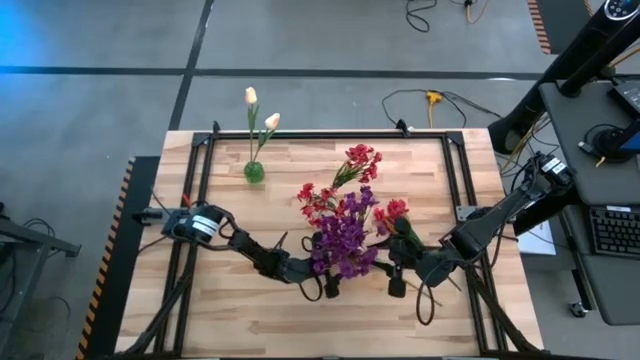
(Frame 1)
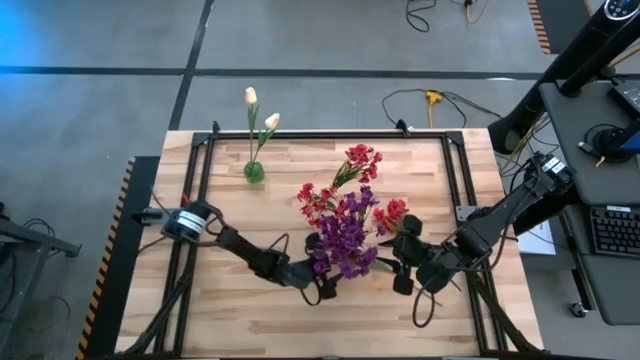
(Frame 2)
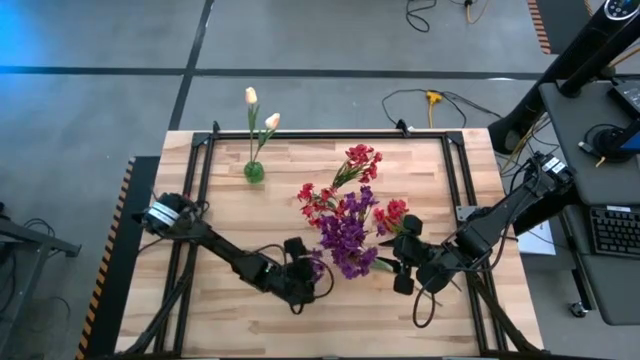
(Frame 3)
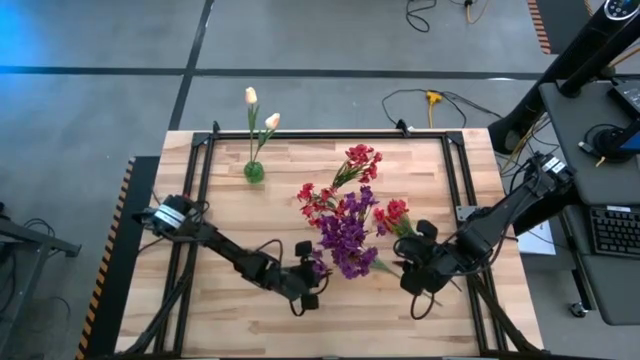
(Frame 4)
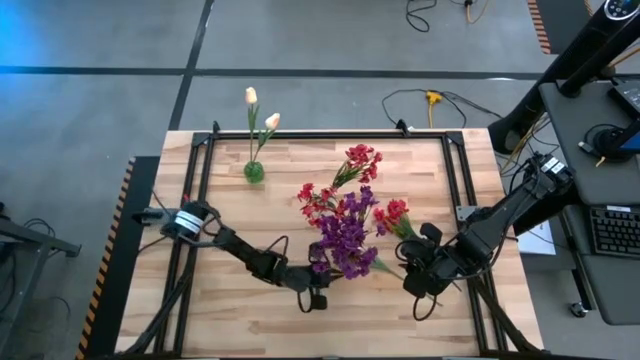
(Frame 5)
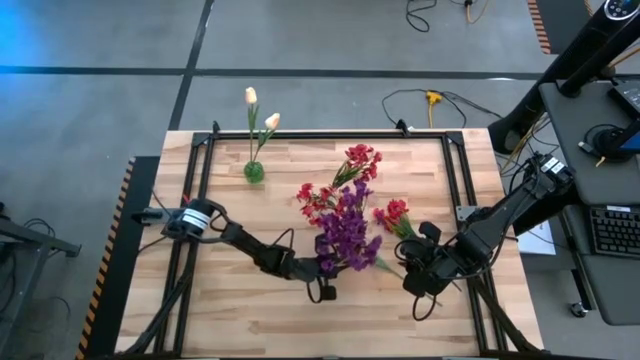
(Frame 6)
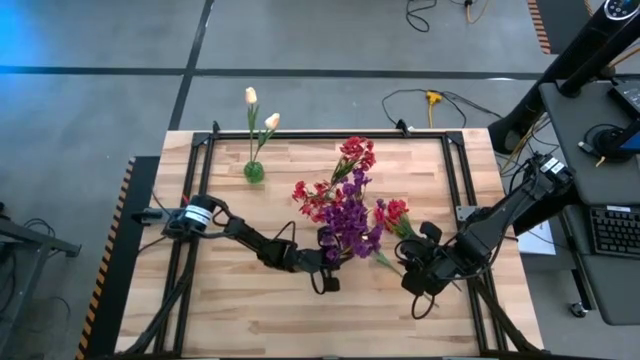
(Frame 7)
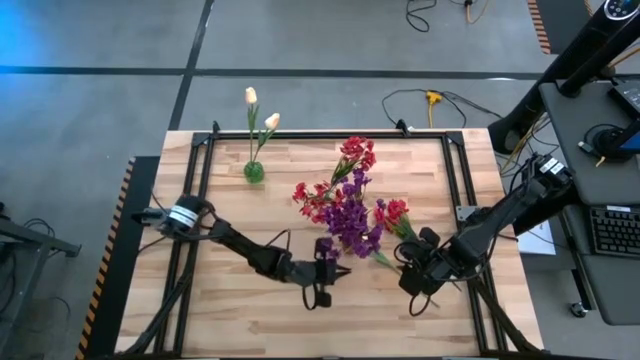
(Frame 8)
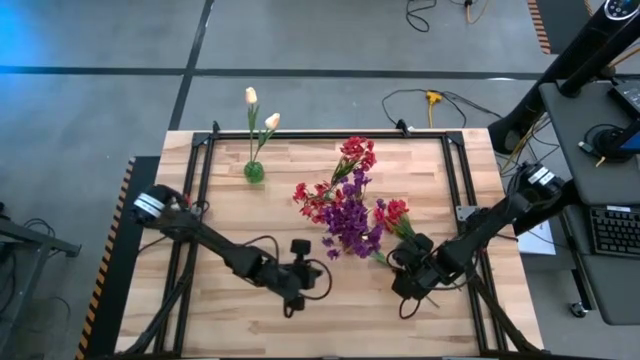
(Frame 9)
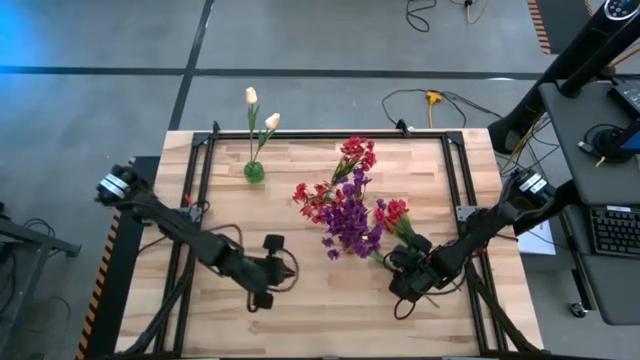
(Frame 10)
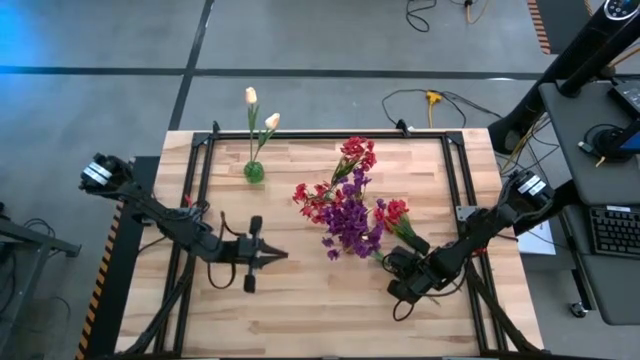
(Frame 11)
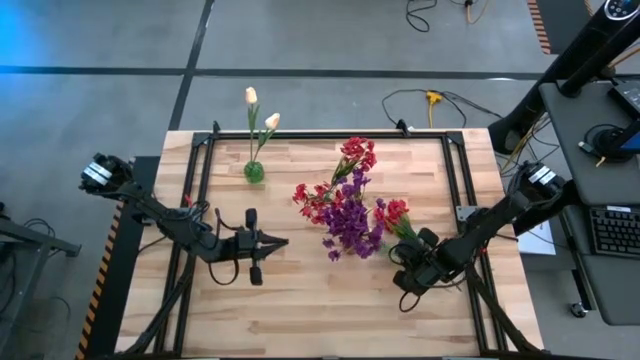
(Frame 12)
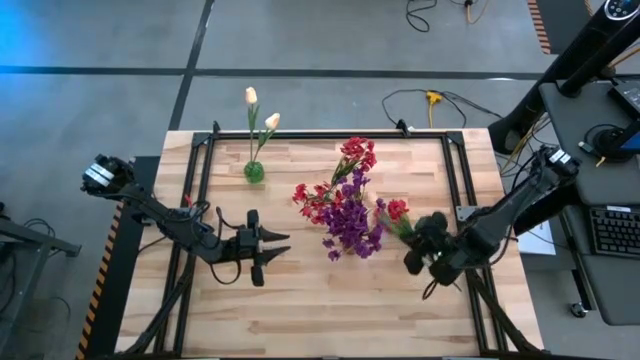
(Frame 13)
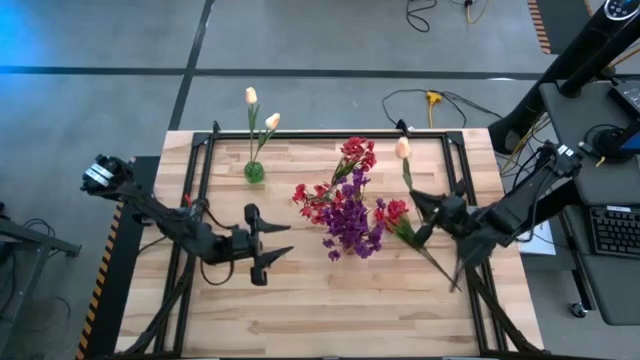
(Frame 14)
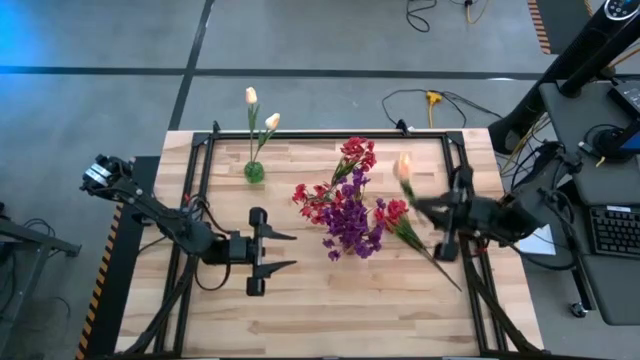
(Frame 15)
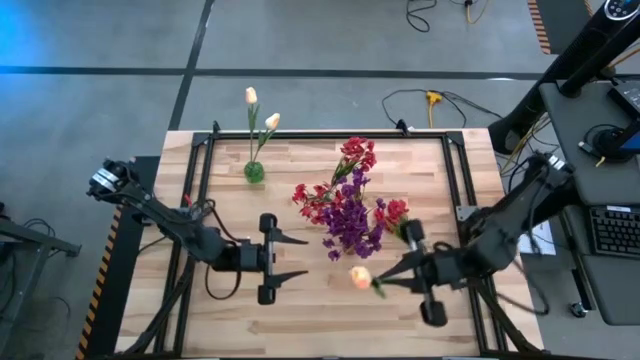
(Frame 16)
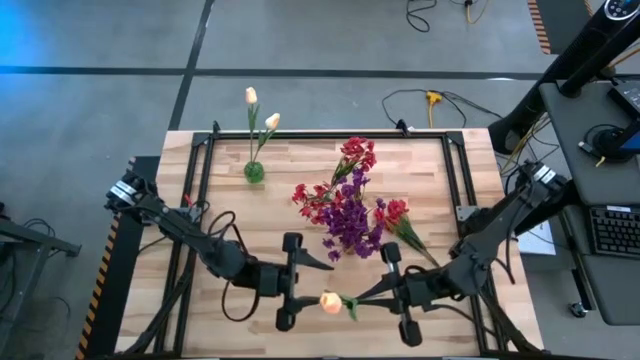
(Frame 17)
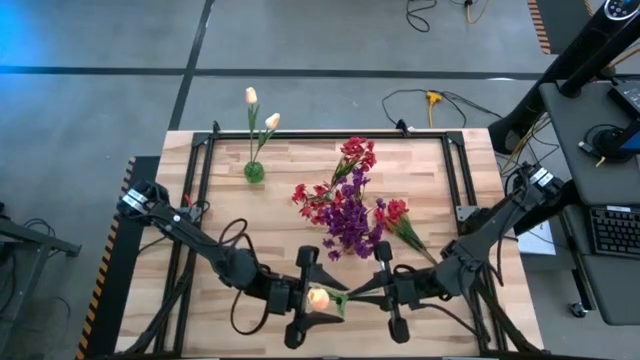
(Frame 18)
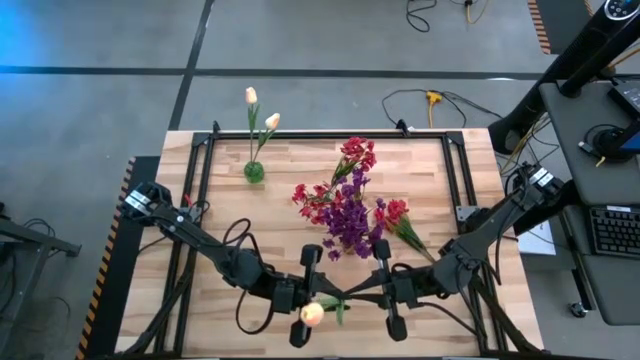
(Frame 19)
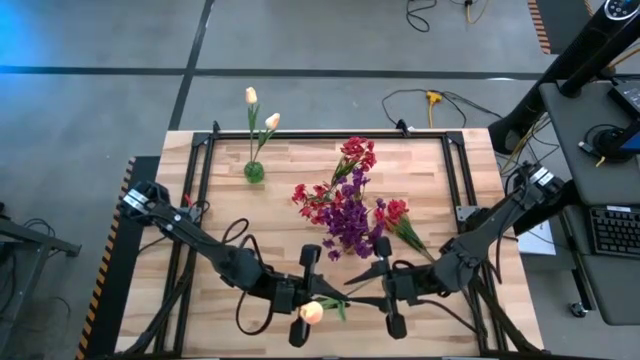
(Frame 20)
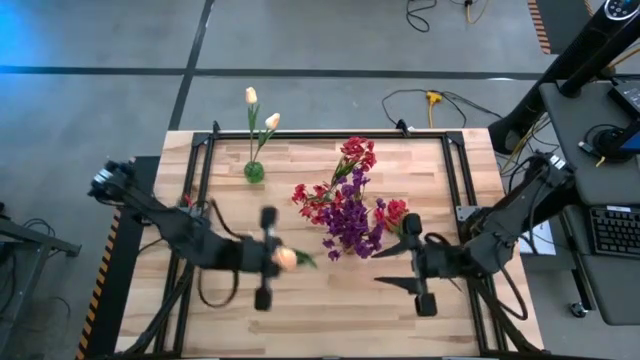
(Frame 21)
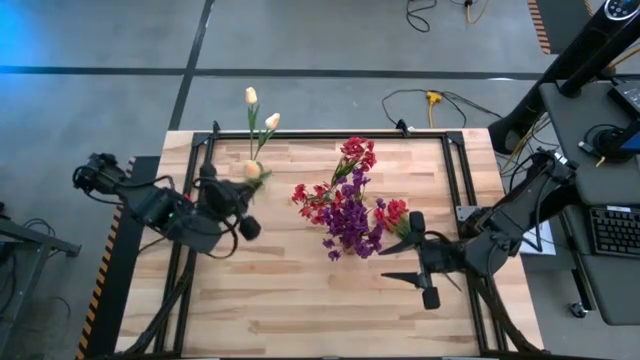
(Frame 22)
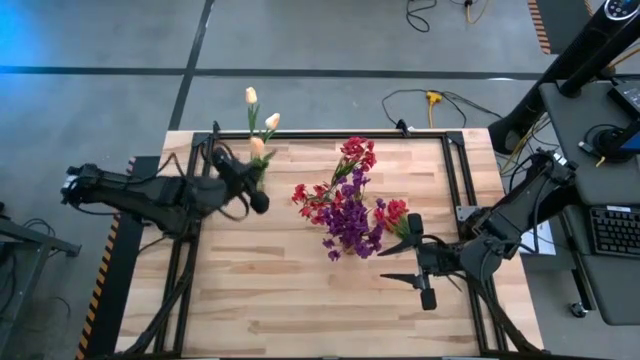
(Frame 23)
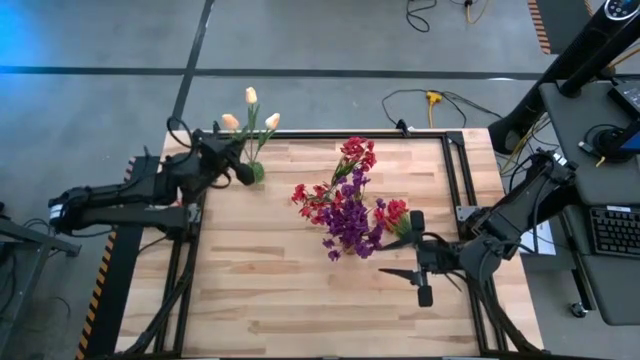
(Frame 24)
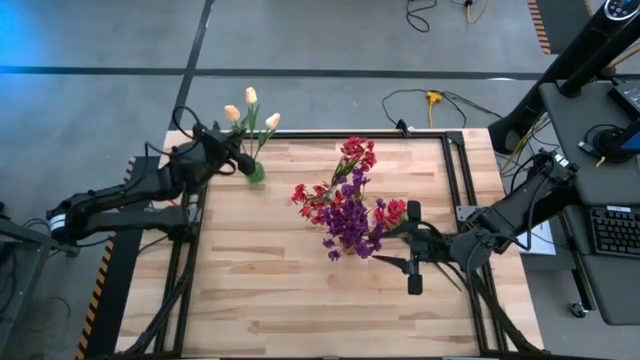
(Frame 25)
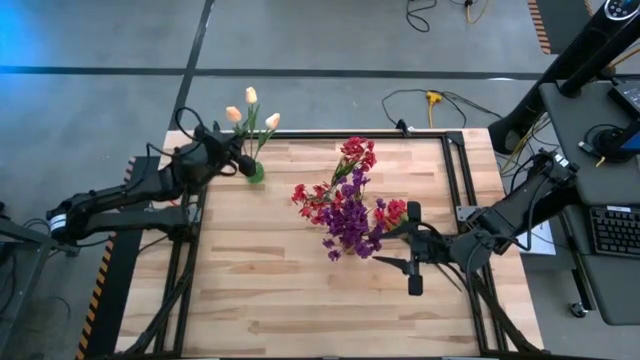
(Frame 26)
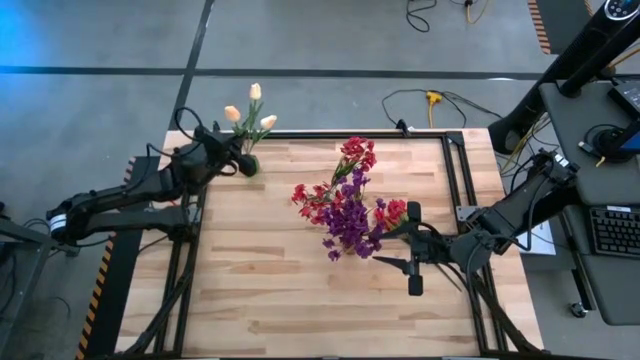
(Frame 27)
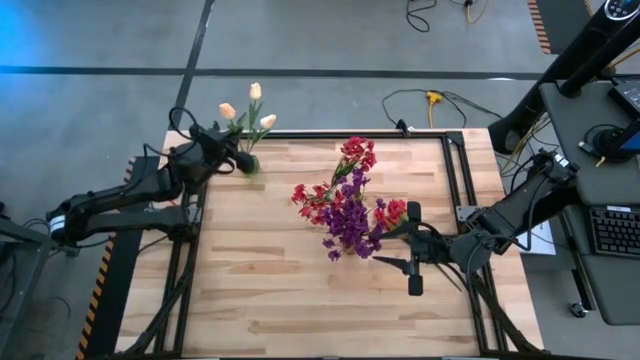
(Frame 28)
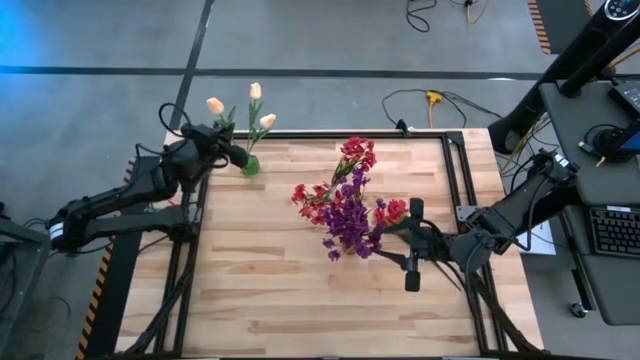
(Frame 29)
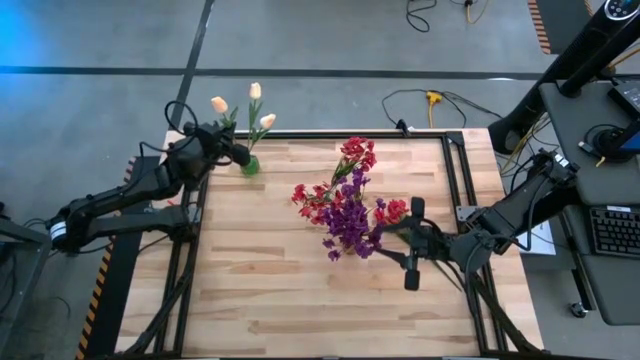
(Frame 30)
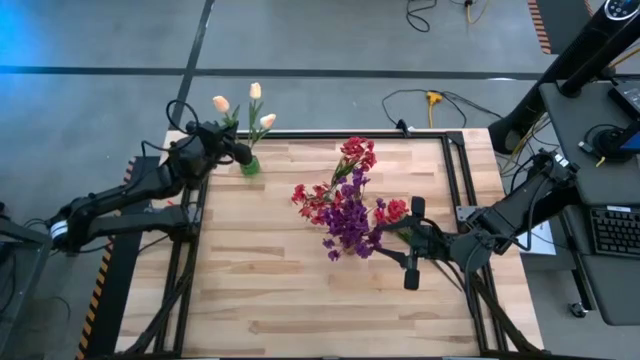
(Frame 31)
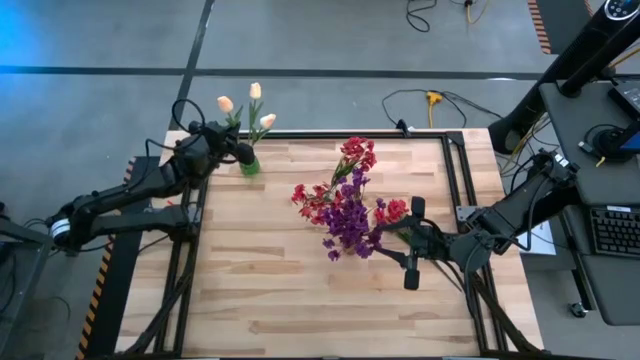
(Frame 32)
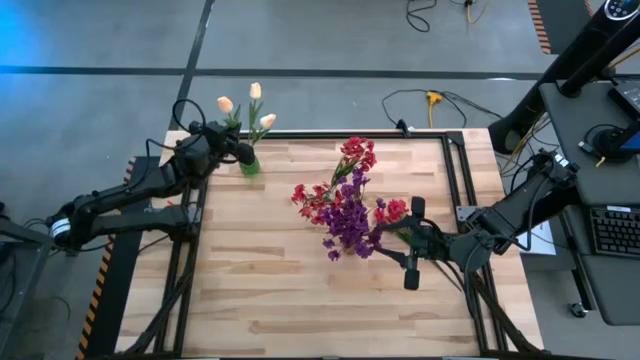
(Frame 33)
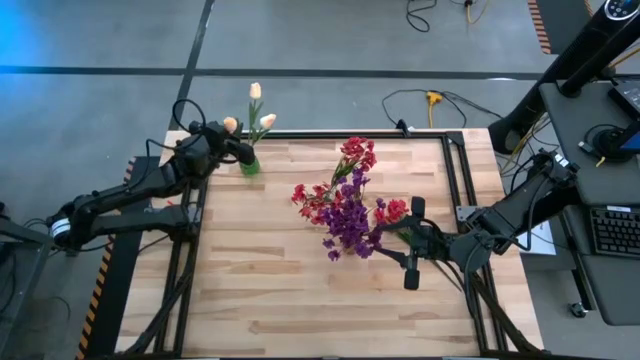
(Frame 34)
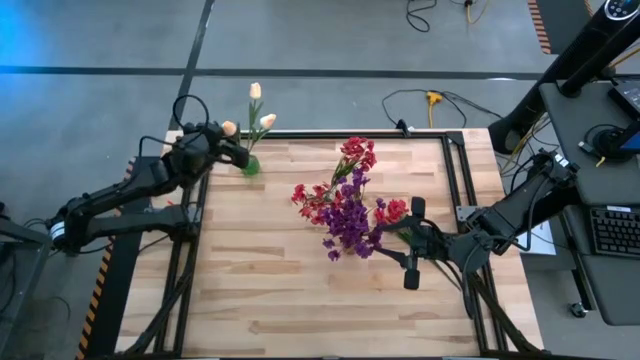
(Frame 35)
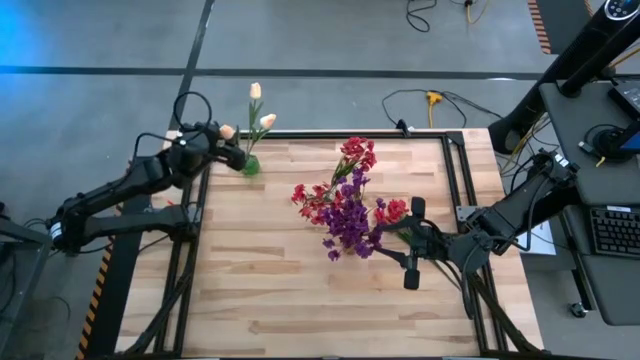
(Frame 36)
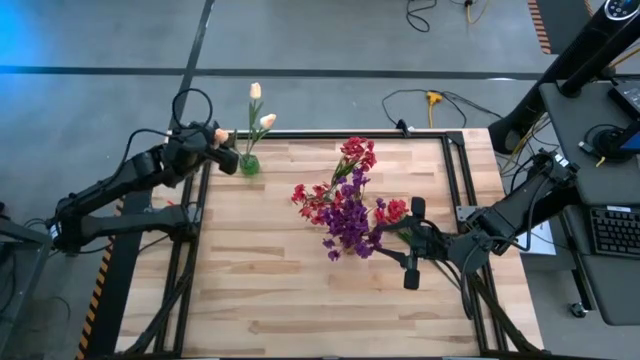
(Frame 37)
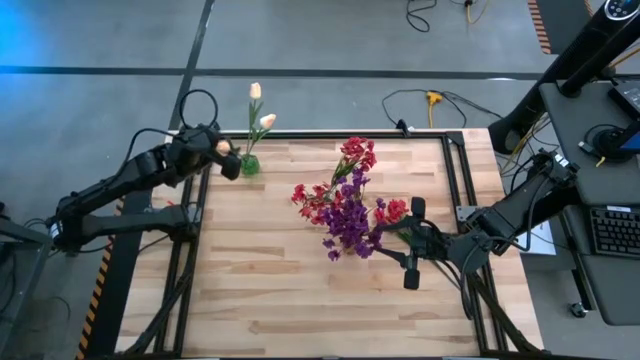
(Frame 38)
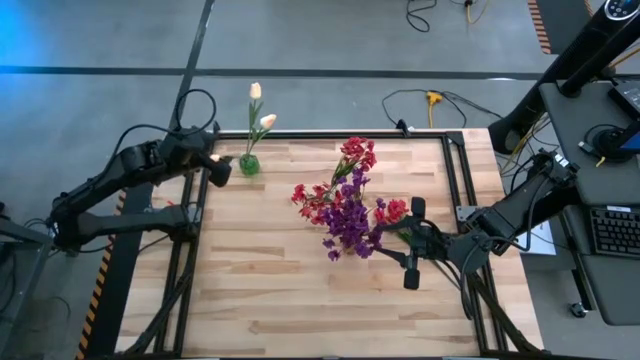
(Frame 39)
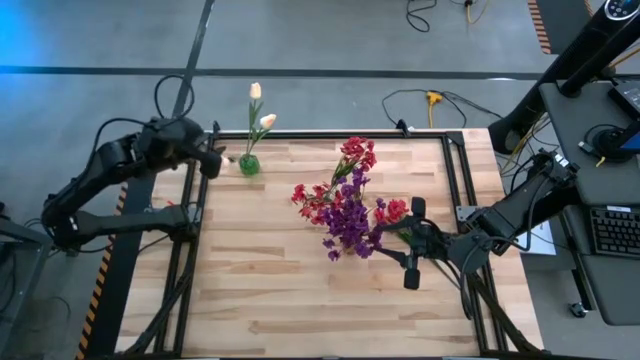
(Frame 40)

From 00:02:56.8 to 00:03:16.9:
Task: Sort flowers into vase by color
Put the pink flowers into the green vase

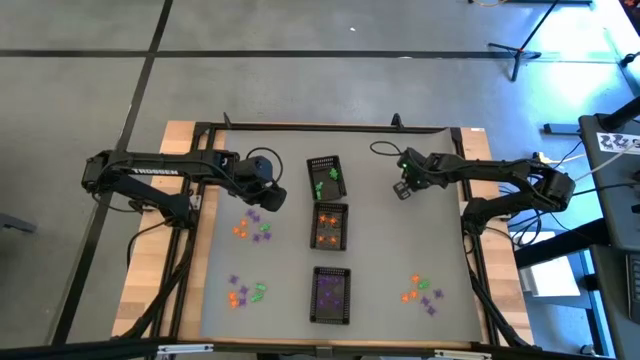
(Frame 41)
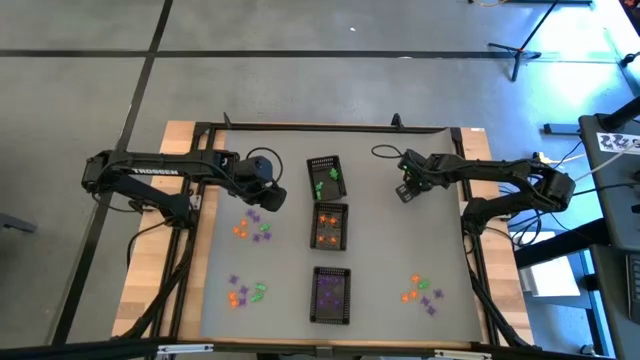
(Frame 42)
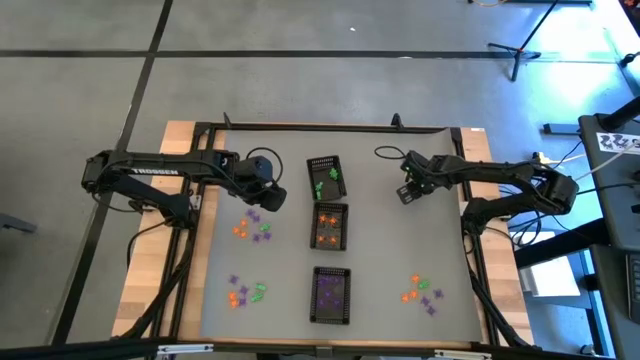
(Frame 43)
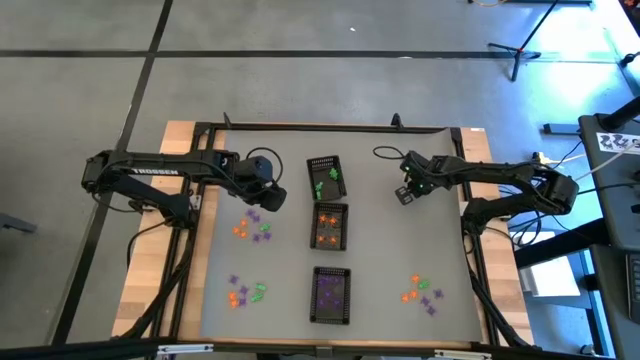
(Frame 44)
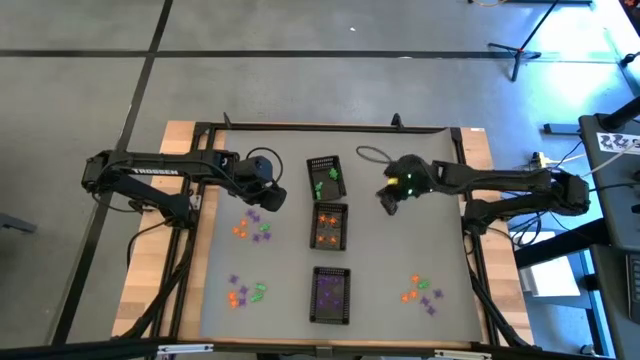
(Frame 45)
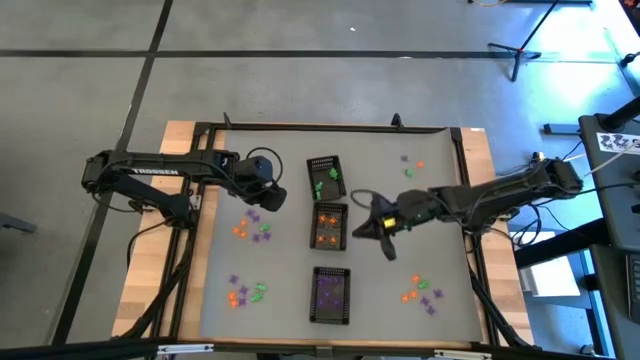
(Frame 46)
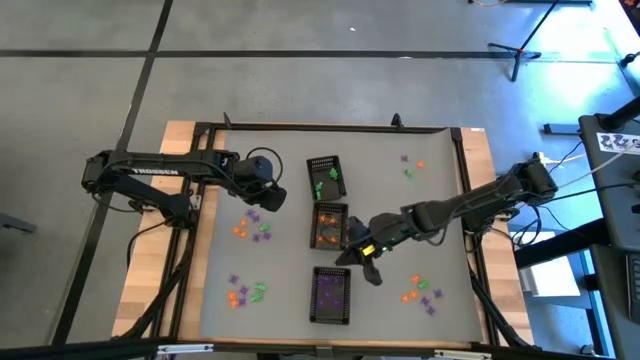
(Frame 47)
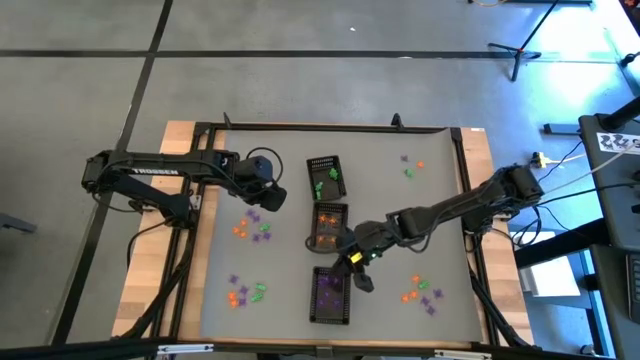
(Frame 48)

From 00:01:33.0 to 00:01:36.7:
Task: Sort Halloween decoration
Put the violet spider toy into the bottom black bin
